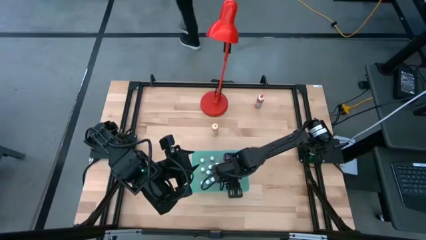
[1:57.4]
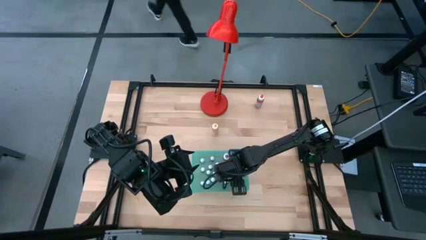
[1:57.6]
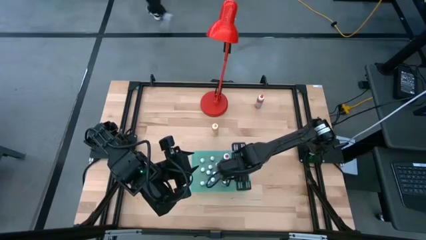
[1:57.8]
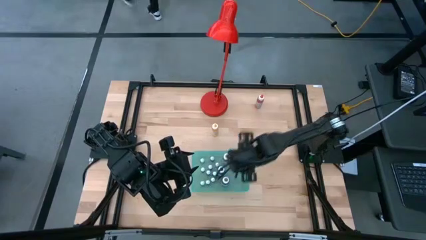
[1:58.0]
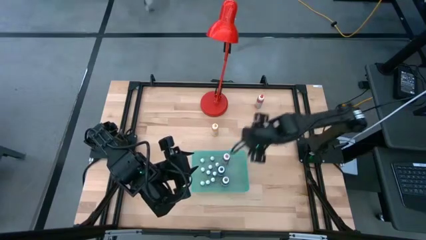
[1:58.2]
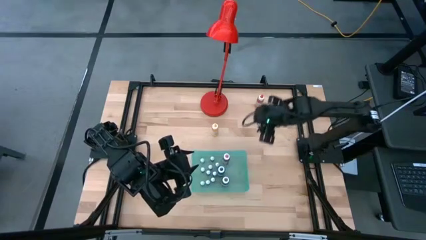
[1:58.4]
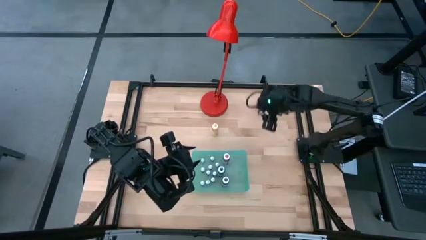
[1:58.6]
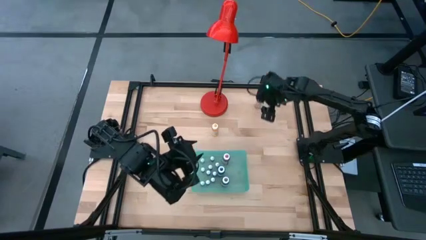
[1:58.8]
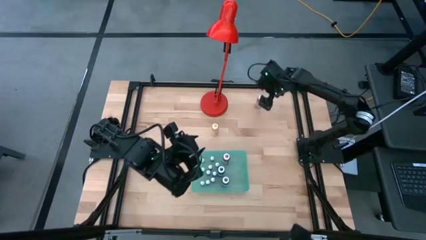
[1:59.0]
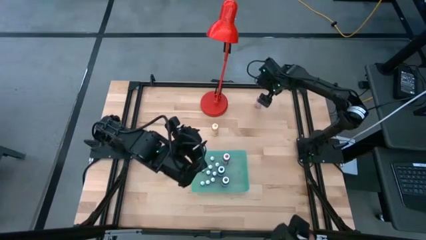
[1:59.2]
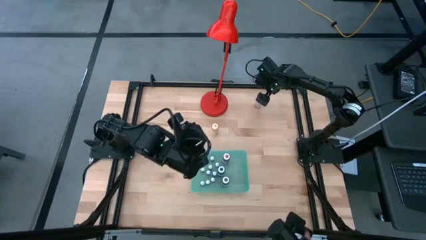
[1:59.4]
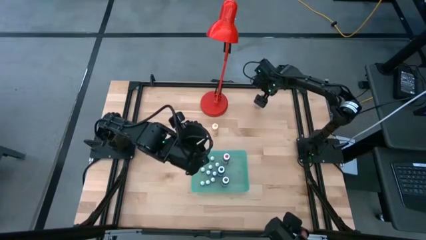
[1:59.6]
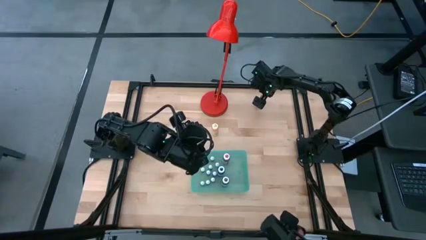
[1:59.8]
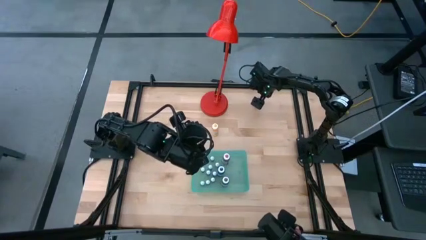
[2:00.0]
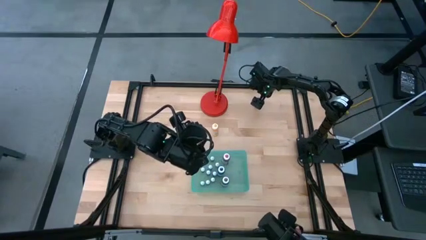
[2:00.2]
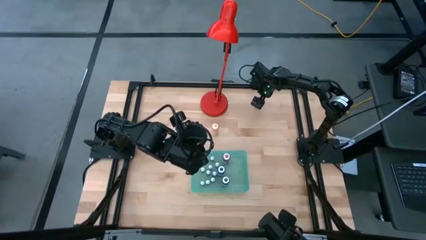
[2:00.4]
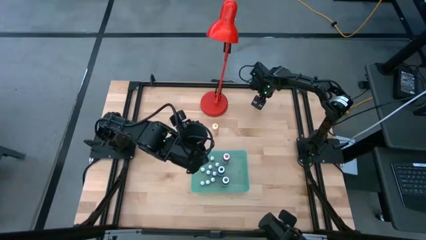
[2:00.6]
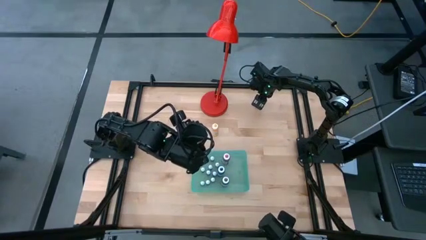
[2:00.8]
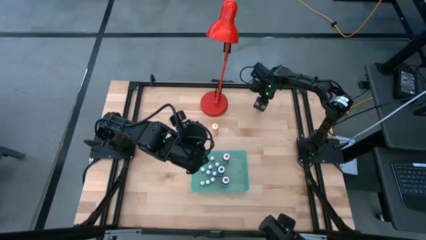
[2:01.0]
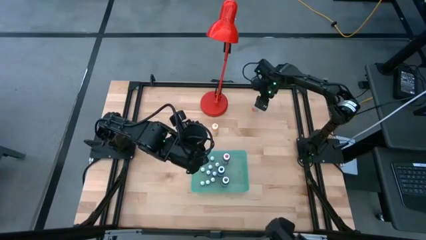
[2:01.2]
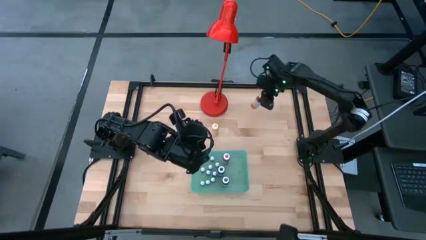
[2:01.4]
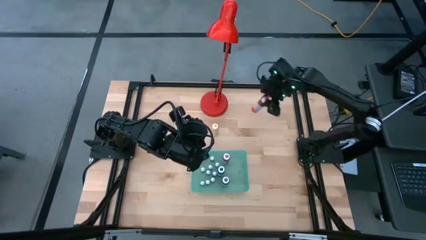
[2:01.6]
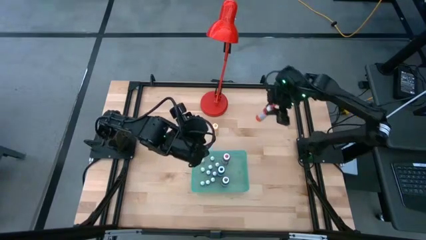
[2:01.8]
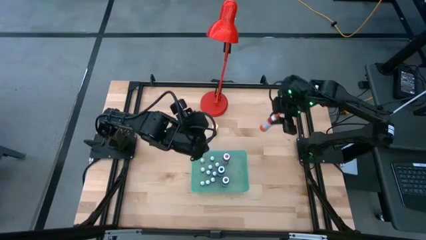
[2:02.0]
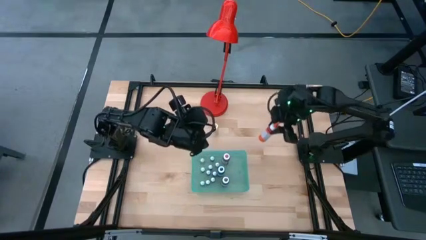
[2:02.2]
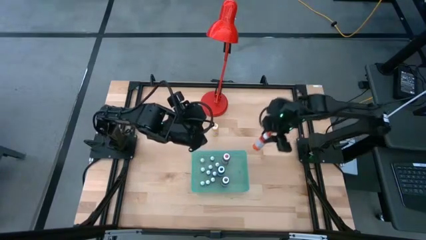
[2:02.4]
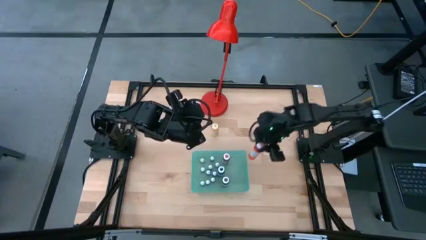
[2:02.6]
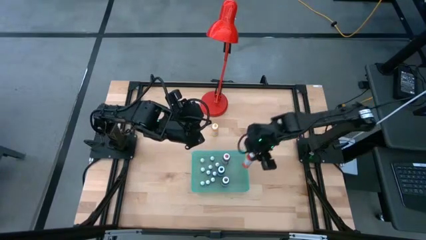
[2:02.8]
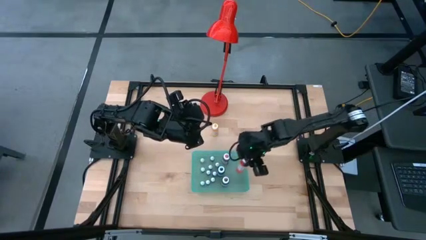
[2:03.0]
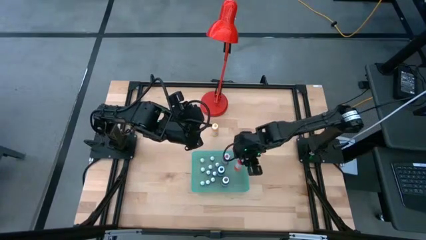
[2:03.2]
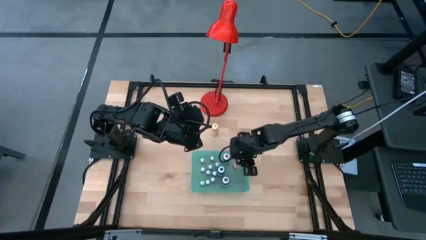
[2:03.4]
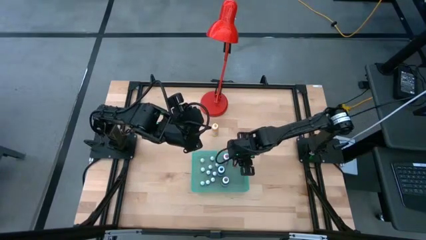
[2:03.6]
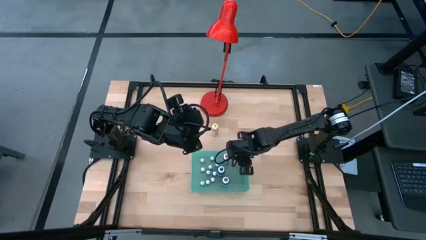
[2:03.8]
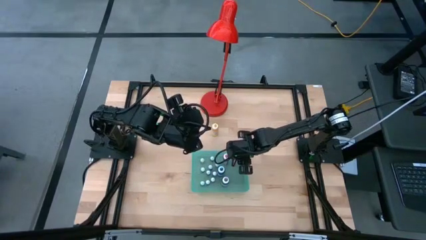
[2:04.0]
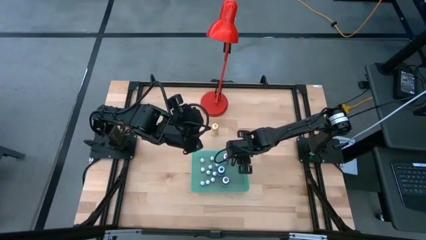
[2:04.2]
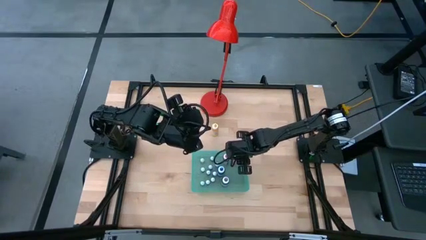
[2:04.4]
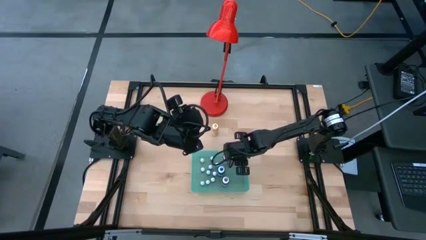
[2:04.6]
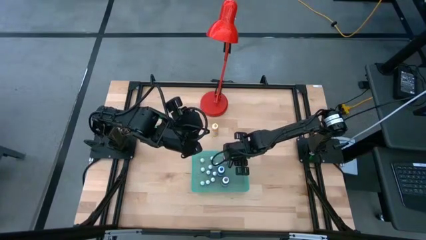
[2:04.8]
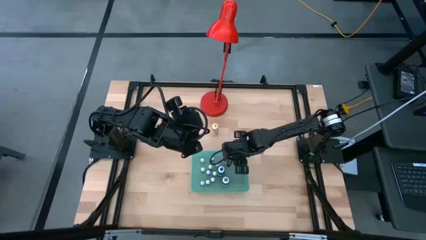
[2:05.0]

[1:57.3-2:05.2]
Task: Pick & Place food coloring
Put the big orange food coloring bottle into the blue bin

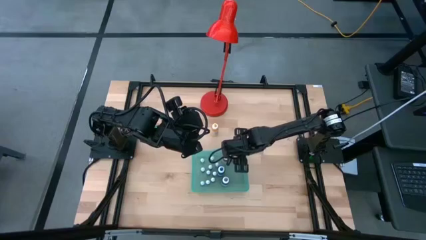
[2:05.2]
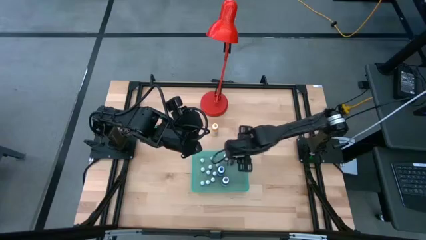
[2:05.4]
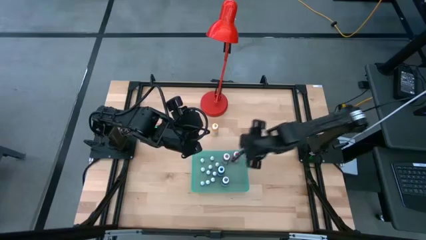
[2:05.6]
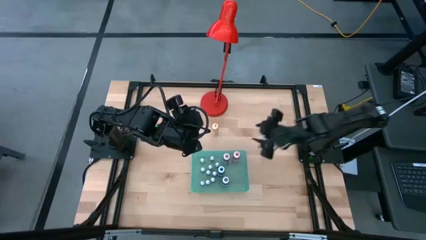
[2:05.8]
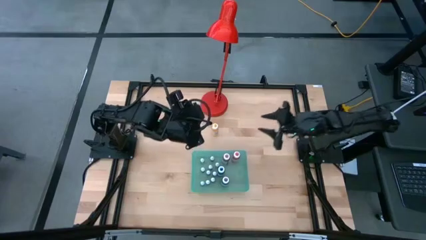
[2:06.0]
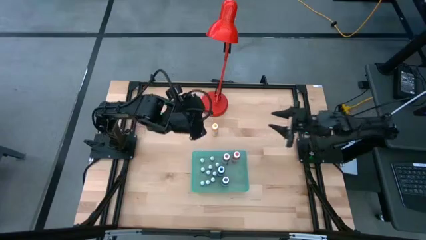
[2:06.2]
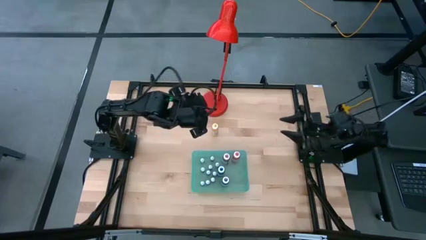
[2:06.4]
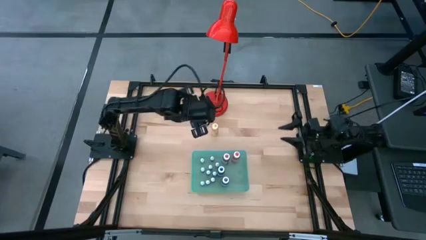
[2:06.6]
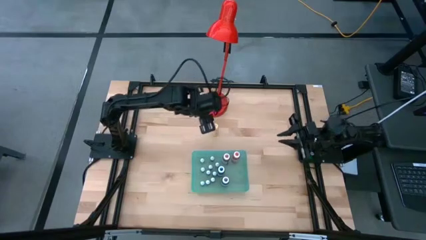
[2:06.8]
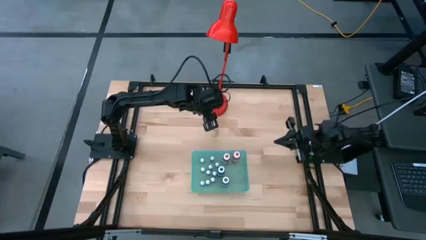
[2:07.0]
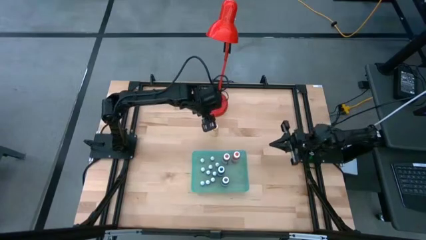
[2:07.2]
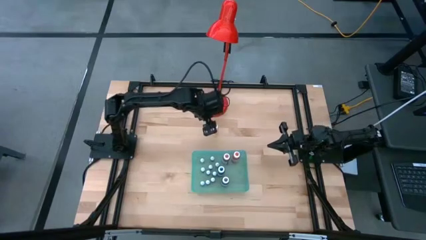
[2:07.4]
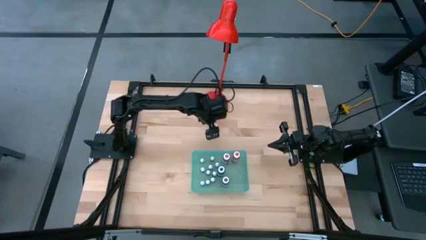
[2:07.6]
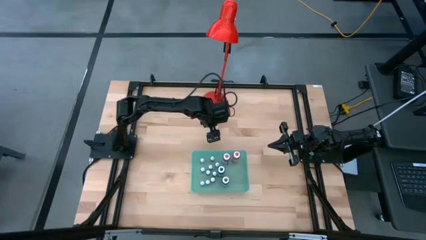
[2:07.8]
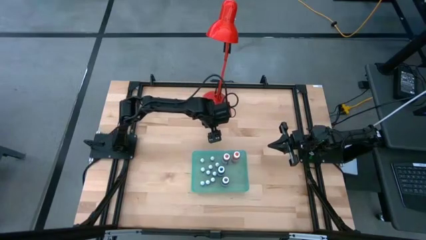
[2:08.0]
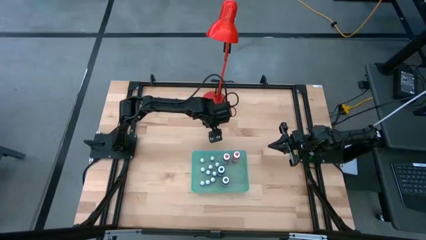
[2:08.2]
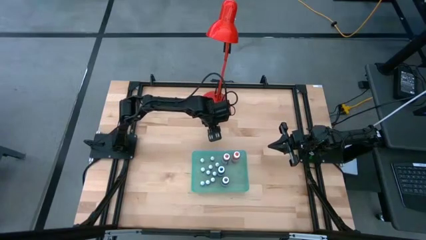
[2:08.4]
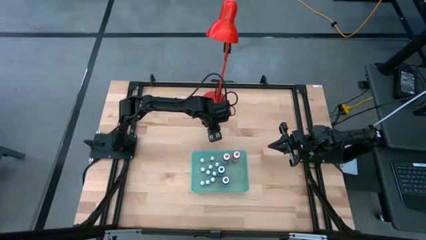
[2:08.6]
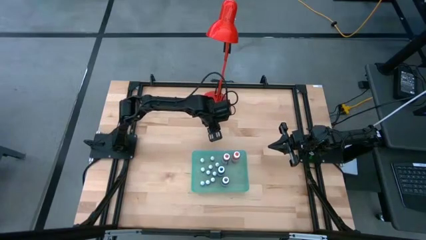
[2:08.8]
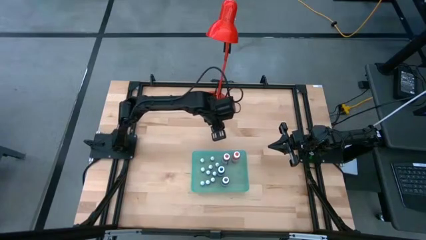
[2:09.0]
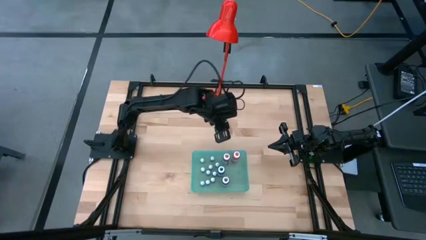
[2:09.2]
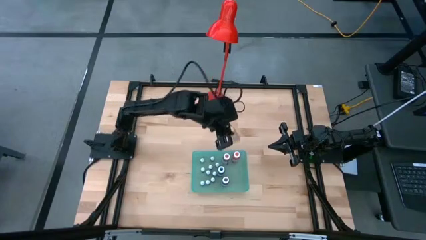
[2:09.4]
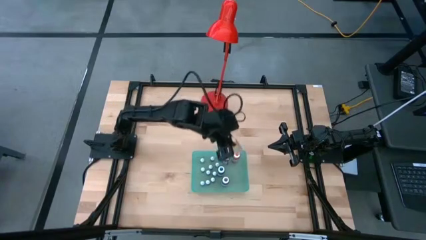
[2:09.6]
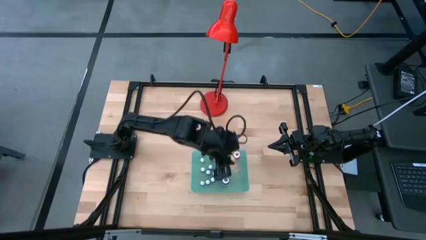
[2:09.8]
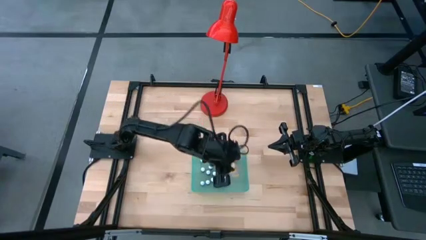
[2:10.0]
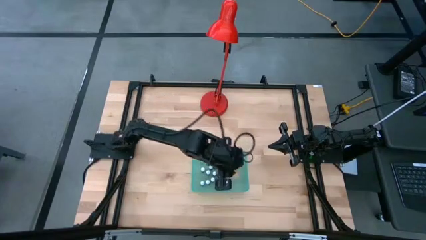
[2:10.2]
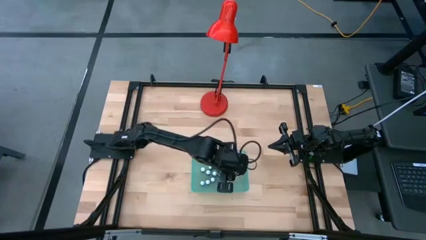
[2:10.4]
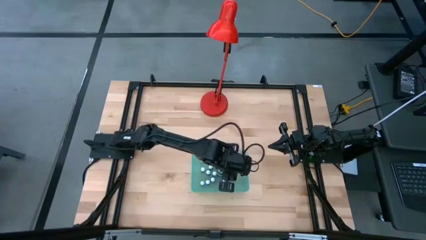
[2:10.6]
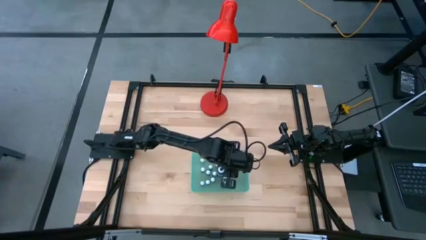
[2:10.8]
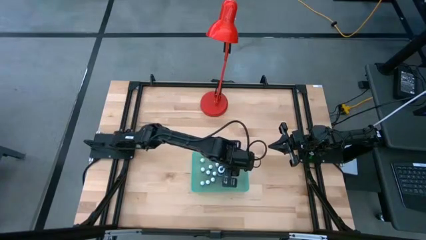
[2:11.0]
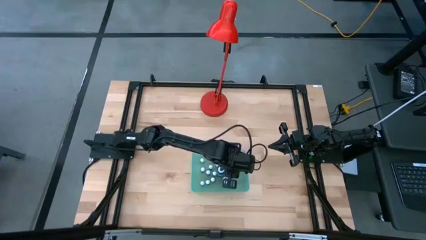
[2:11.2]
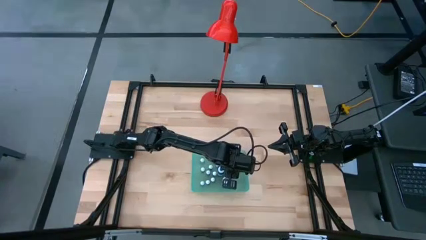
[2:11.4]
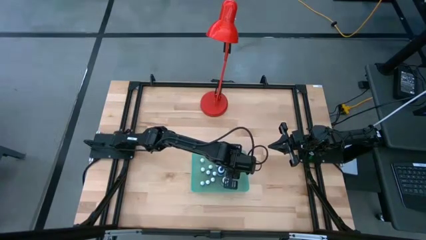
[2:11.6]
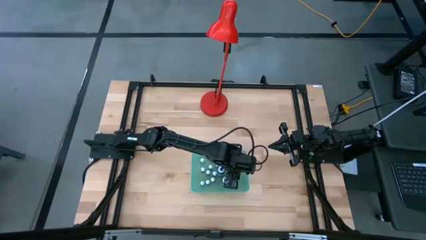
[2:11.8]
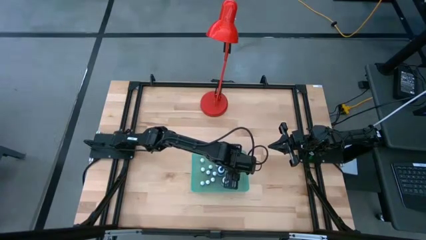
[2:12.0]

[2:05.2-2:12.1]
Put the big yellow food coloring bottle into the blue bin
